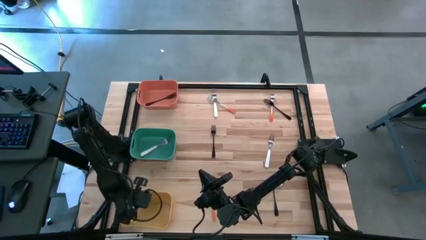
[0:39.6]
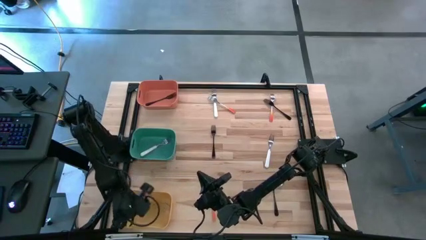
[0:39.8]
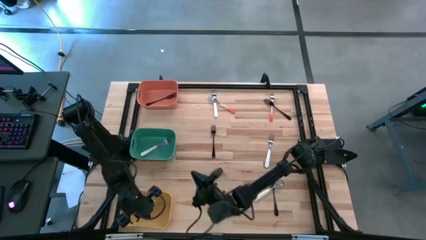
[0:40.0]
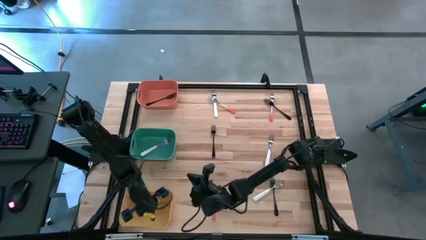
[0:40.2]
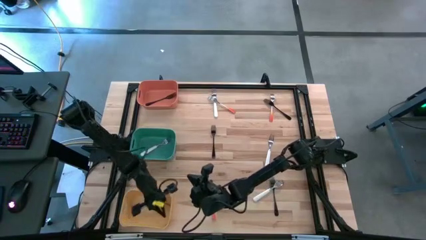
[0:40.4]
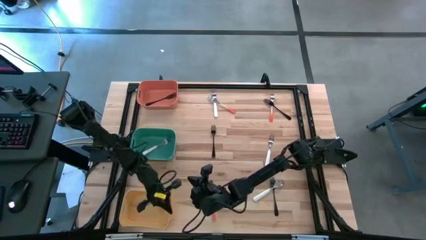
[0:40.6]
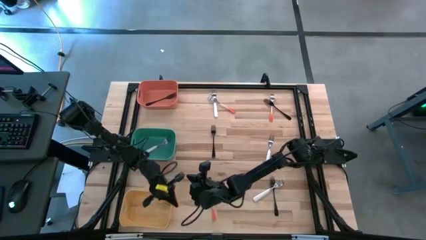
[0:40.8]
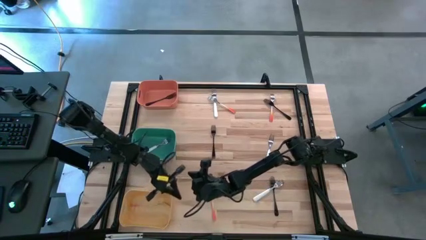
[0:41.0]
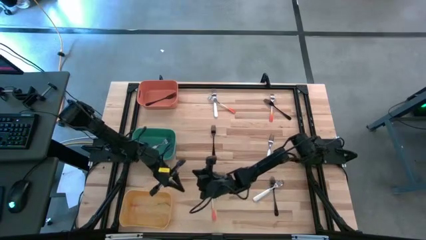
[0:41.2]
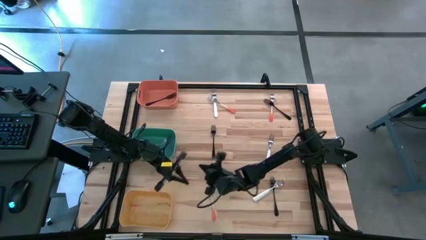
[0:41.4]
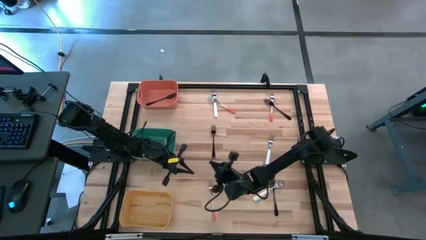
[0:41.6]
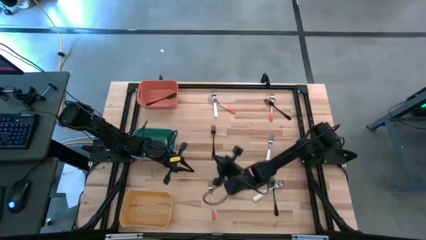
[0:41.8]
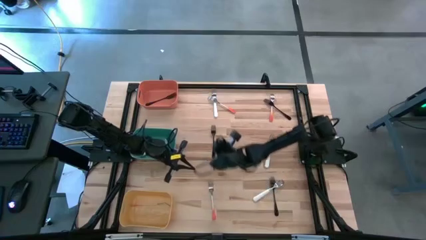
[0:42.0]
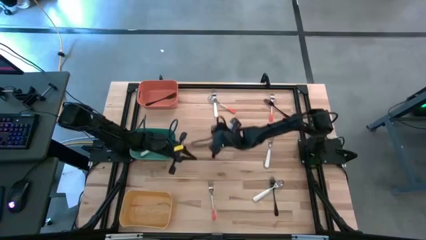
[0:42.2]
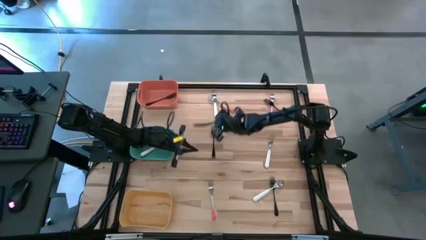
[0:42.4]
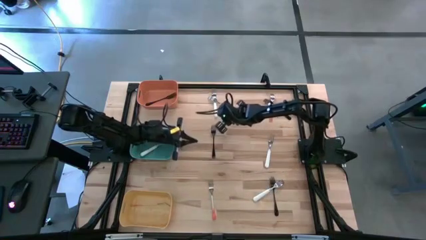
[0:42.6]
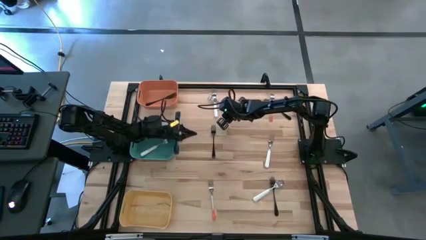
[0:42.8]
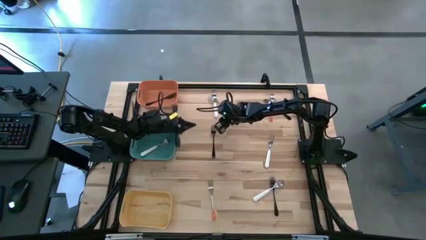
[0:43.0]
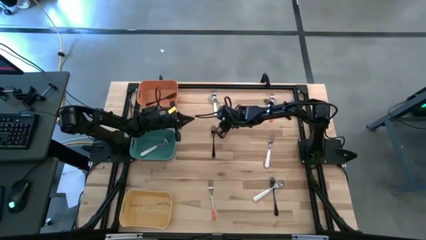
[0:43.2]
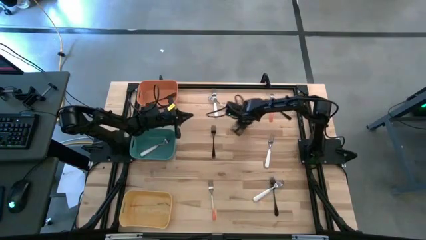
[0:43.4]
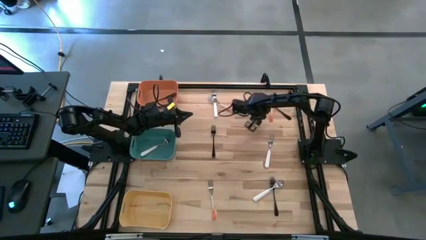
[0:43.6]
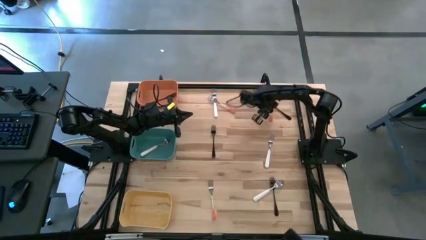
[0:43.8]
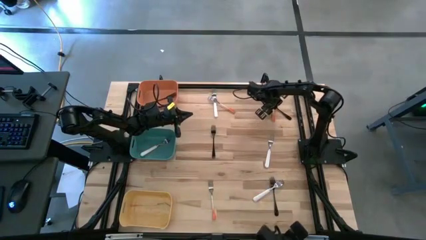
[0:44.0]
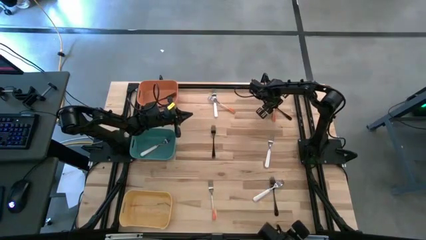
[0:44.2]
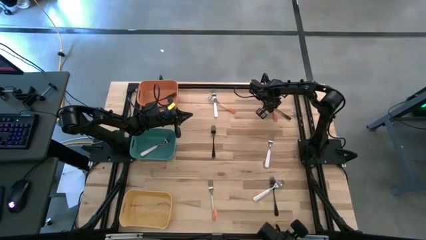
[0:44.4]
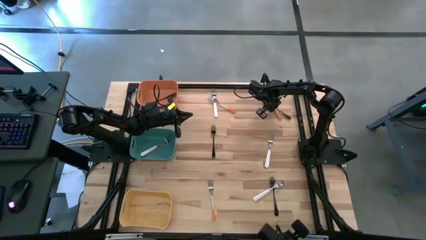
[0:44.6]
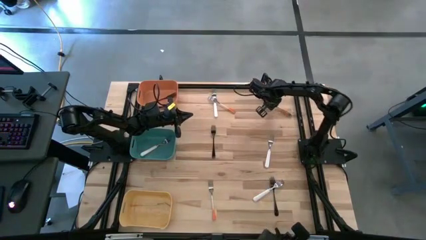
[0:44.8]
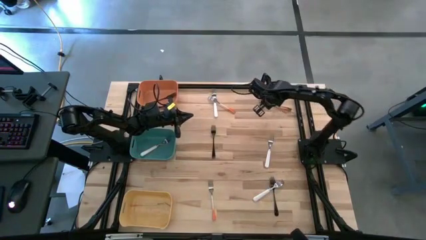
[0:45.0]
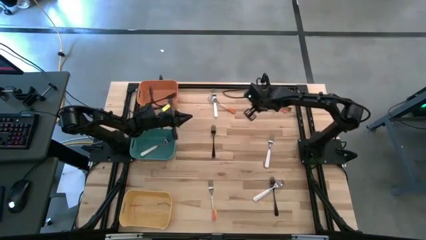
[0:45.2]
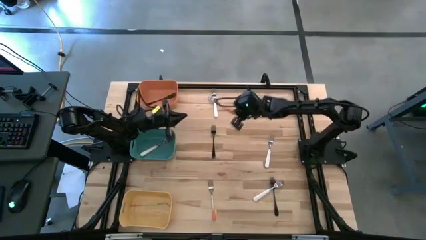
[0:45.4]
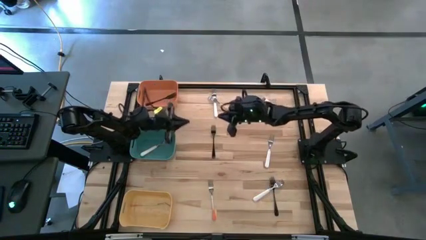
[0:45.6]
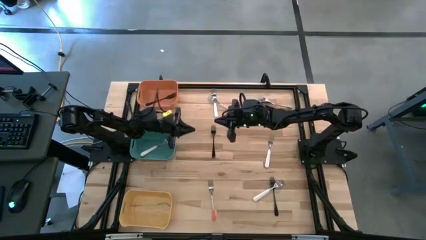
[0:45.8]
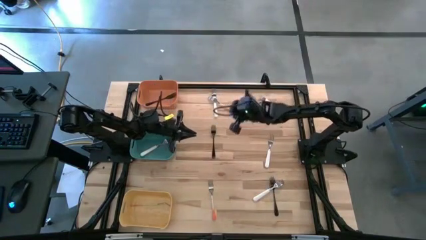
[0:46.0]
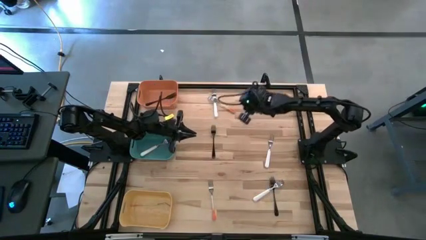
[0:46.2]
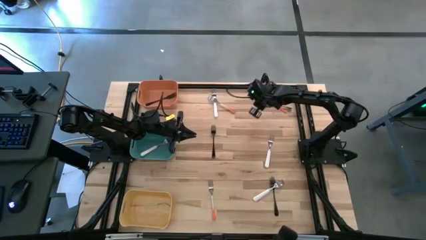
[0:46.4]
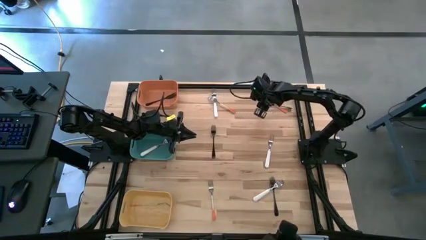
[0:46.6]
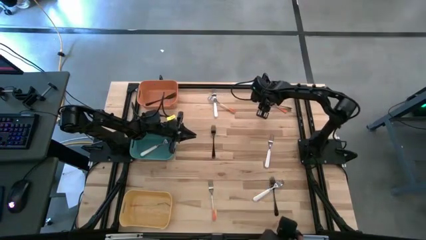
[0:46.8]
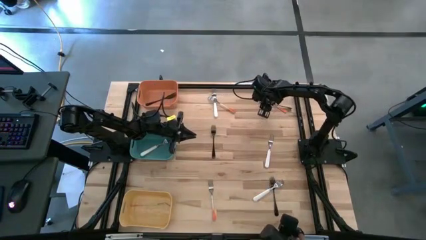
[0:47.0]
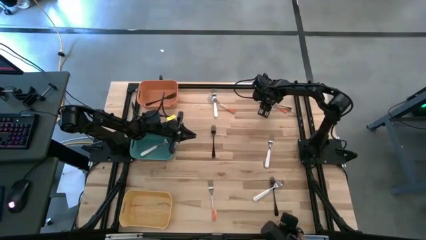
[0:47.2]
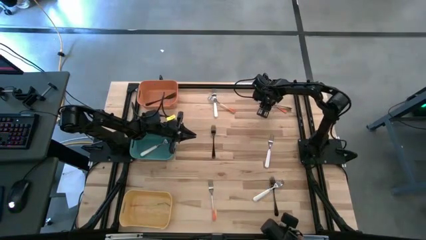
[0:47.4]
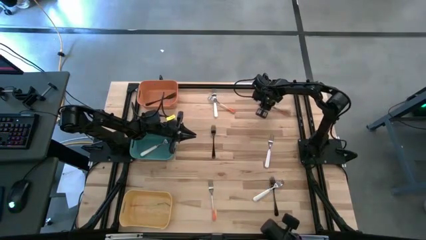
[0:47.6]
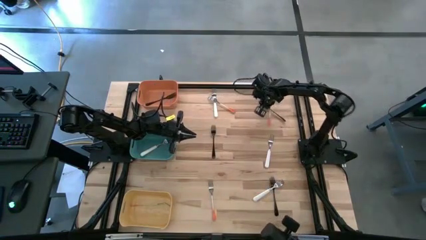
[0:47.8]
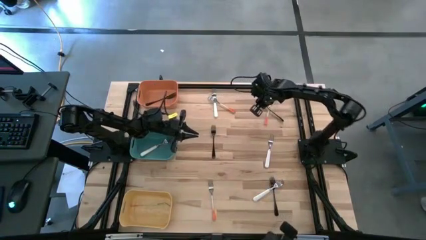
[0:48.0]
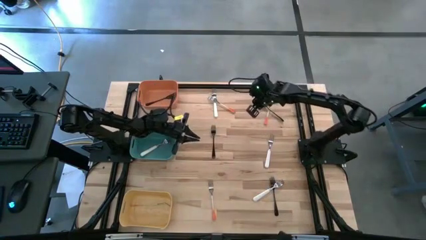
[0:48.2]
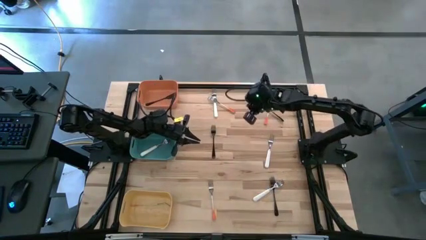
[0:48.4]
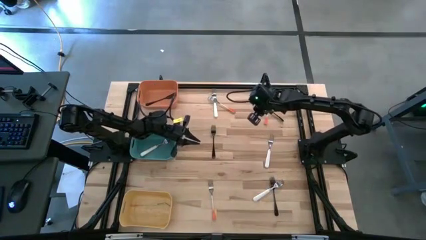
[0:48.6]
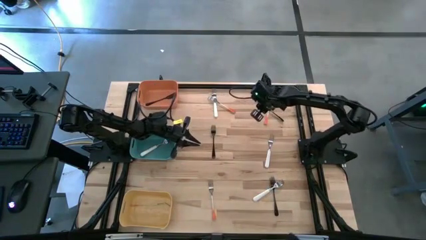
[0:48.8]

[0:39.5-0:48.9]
Task: Sort silverware by color (type)
Put the black fork into the orange bin

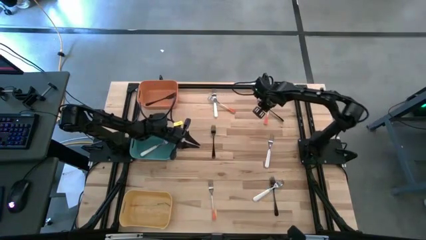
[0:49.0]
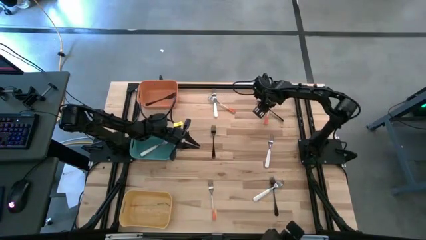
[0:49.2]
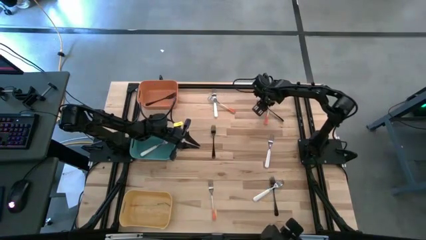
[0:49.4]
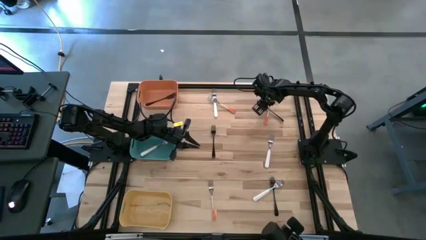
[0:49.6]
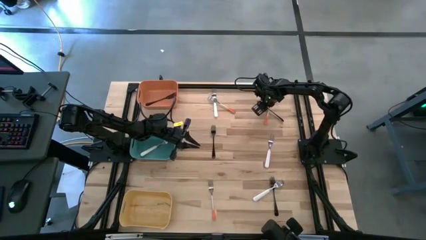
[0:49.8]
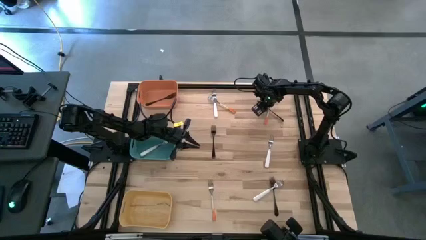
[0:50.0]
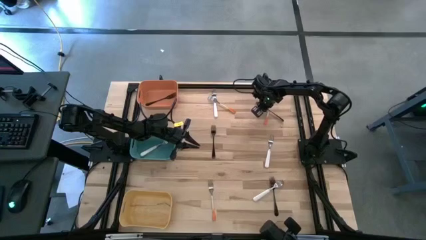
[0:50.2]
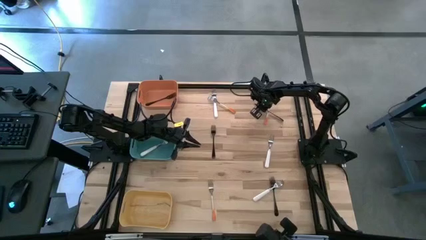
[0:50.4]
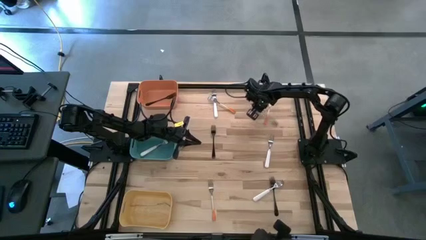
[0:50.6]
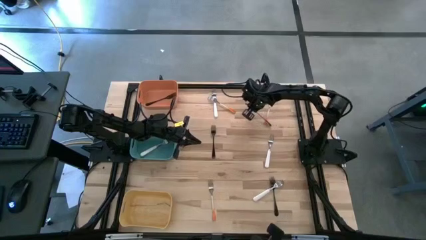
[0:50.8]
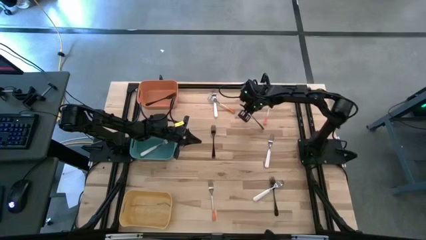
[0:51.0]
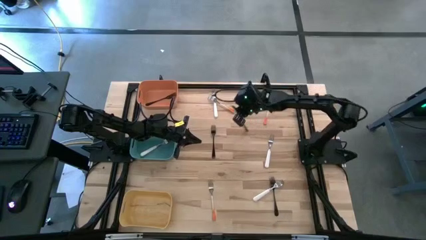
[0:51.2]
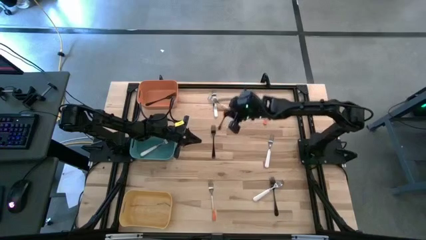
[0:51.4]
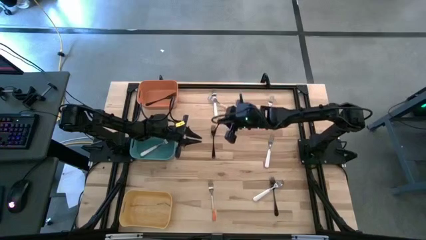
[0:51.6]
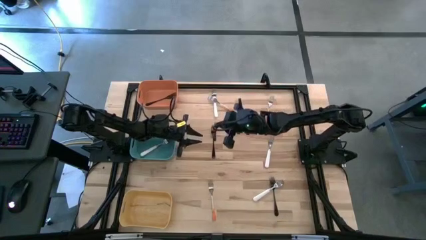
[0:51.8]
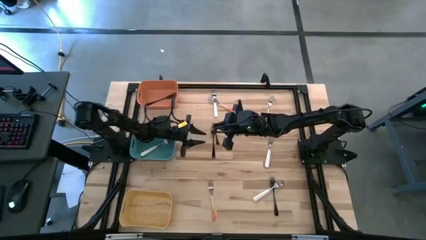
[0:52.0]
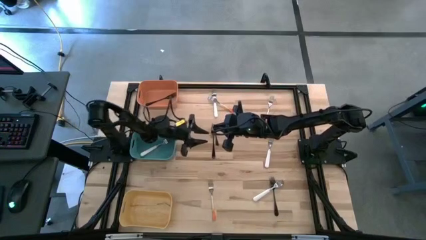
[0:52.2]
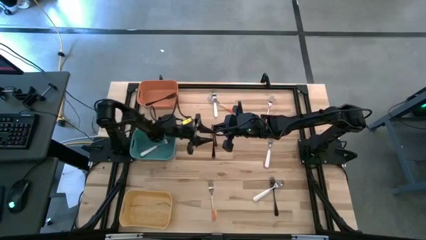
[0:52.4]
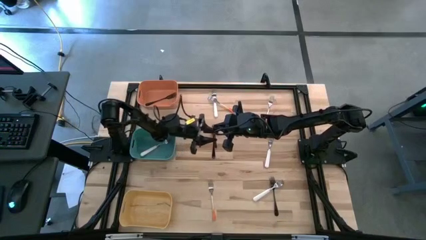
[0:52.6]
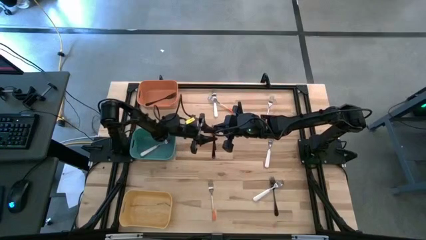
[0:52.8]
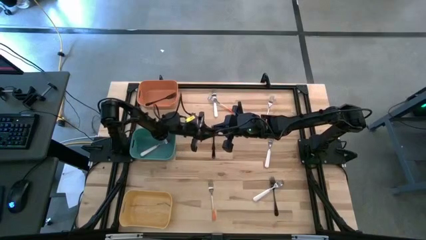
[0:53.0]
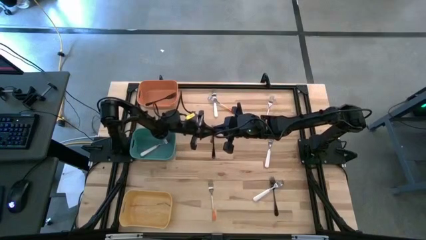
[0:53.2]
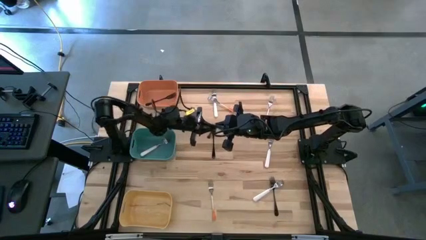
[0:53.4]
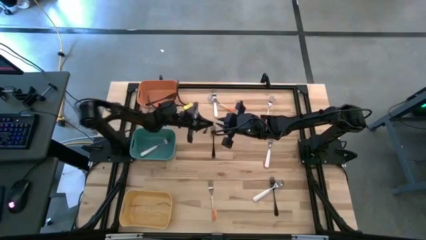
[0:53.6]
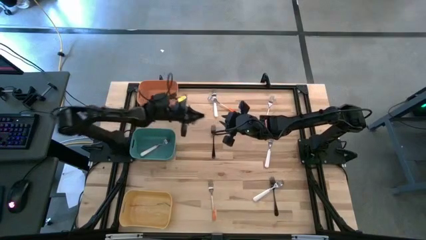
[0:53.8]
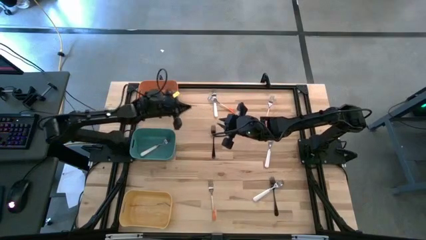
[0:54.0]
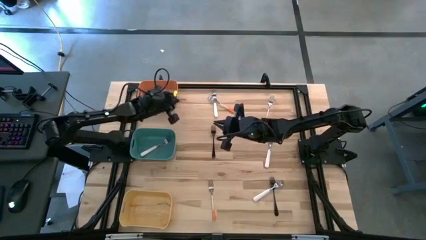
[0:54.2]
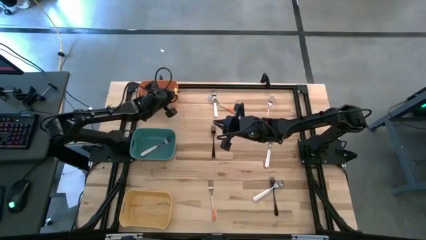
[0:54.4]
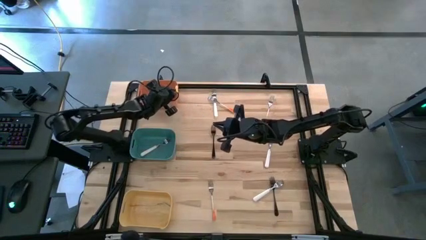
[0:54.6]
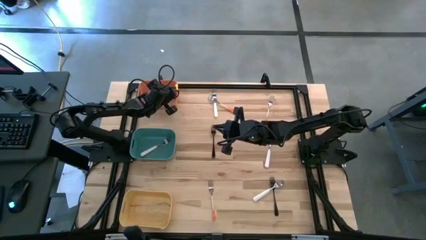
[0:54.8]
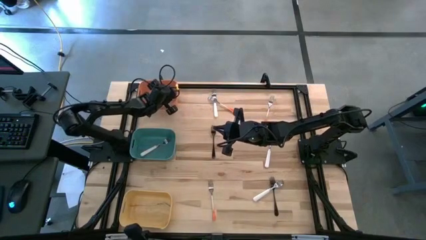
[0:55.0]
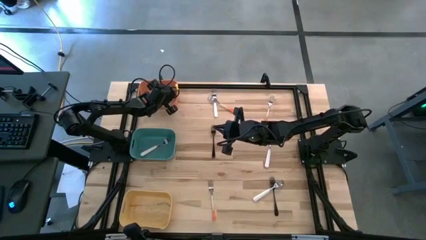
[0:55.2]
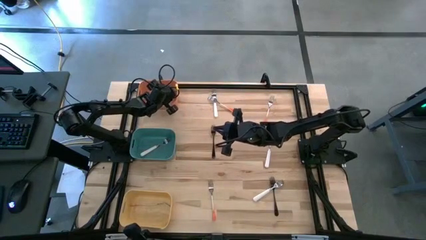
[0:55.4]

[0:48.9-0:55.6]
Put the black fork into the orange bin

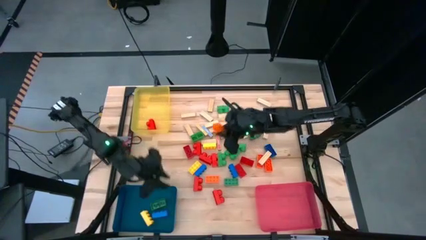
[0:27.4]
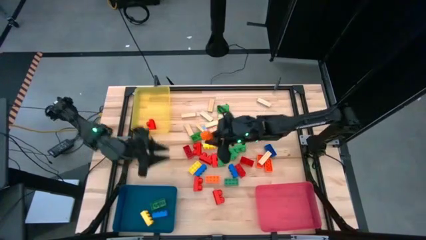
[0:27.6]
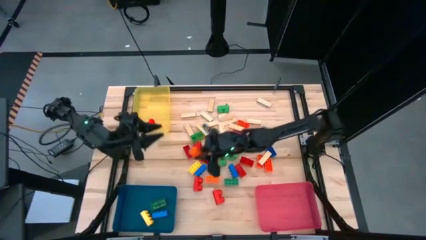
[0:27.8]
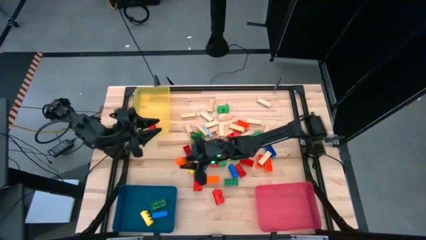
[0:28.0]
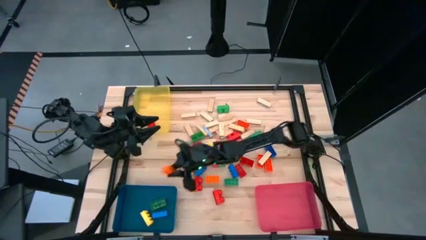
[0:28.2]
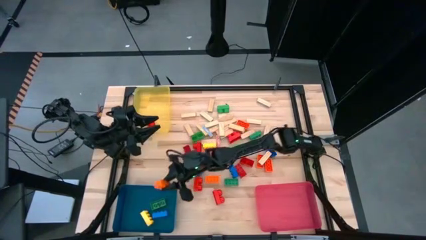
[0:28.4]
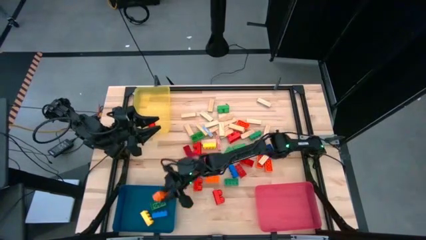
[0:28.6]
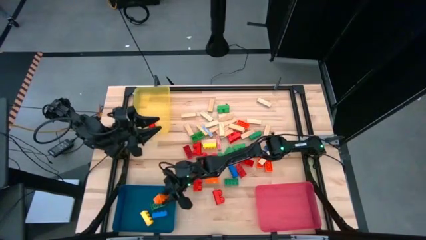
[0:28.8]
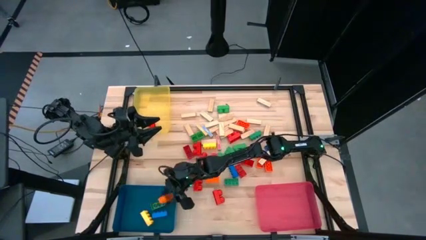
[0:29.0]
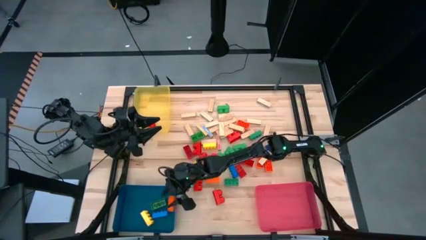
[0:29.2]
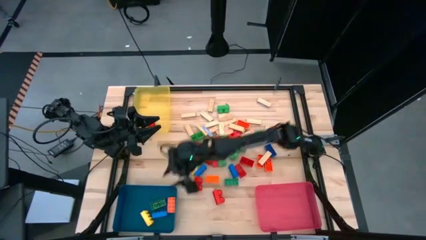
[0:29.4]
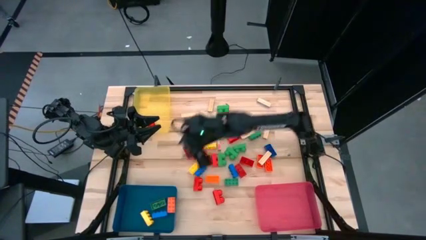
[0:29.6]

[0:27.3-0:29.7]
Task: Sort blocks by size
Put the orange game piece into the blue bin
